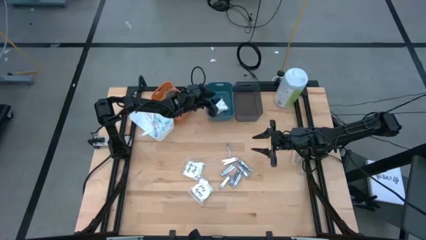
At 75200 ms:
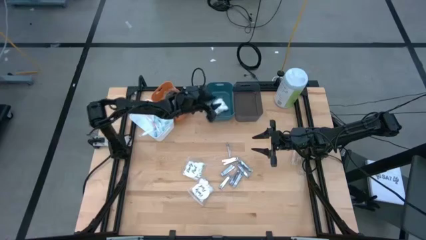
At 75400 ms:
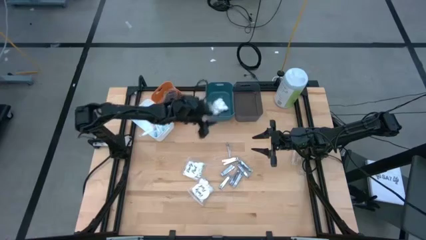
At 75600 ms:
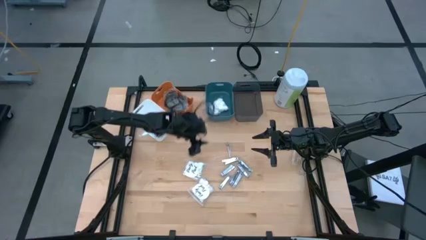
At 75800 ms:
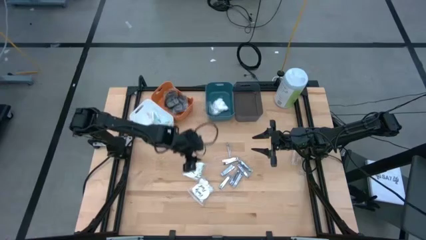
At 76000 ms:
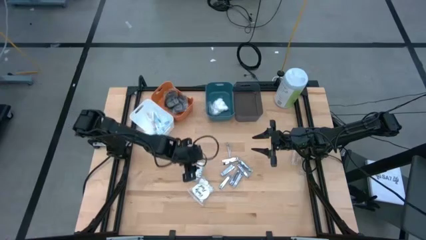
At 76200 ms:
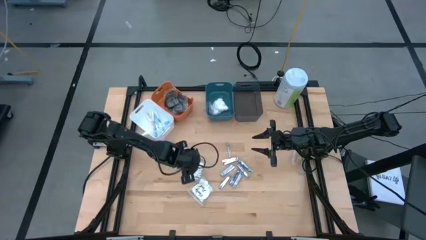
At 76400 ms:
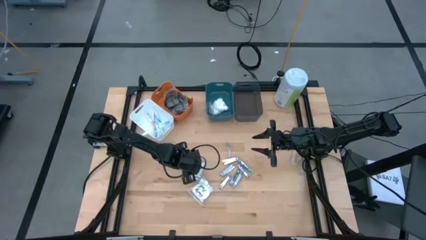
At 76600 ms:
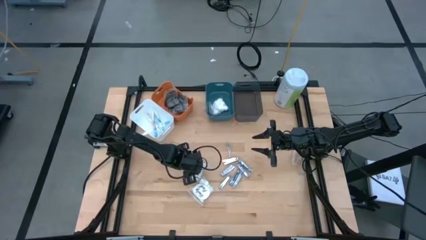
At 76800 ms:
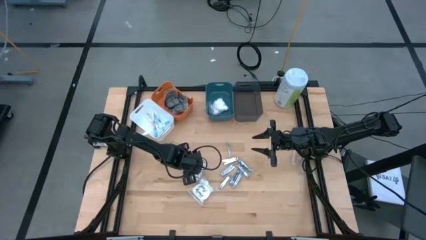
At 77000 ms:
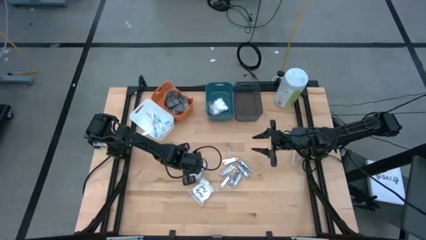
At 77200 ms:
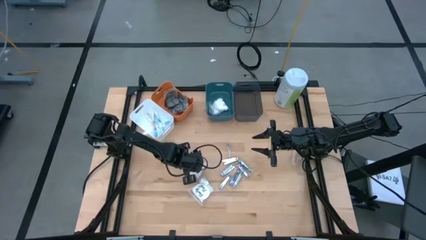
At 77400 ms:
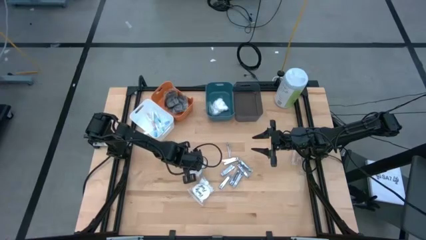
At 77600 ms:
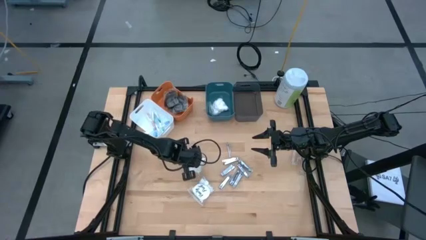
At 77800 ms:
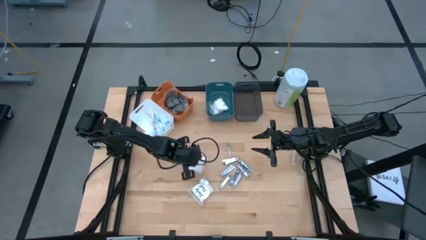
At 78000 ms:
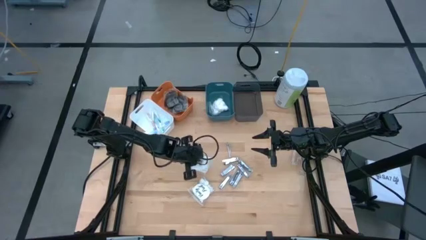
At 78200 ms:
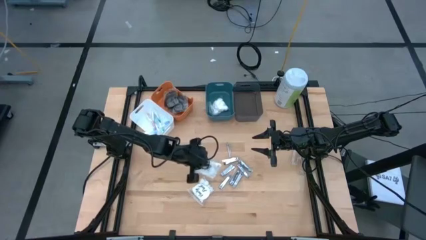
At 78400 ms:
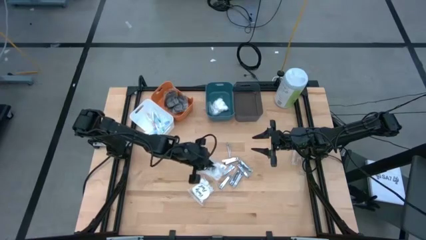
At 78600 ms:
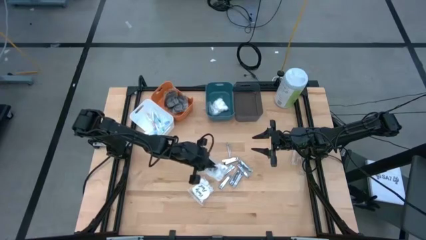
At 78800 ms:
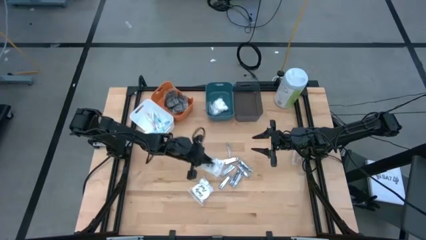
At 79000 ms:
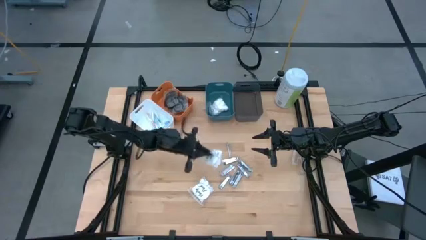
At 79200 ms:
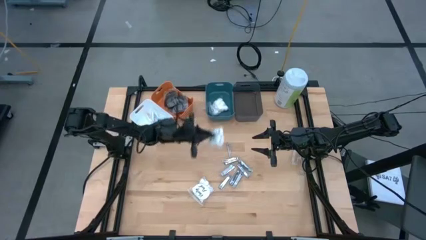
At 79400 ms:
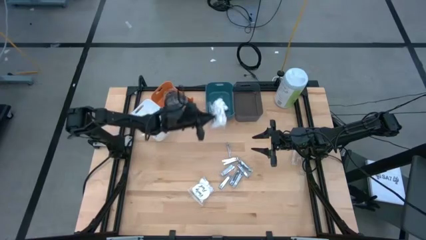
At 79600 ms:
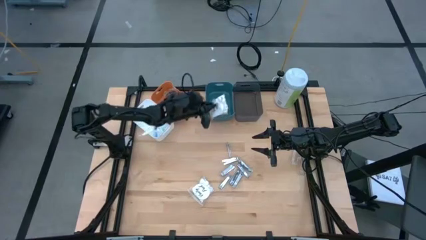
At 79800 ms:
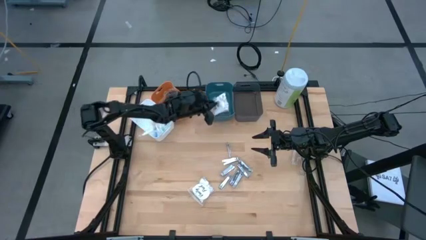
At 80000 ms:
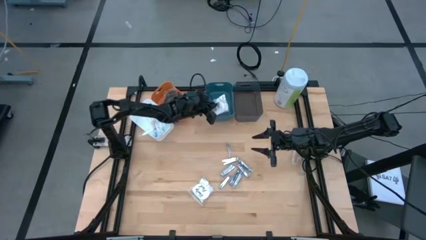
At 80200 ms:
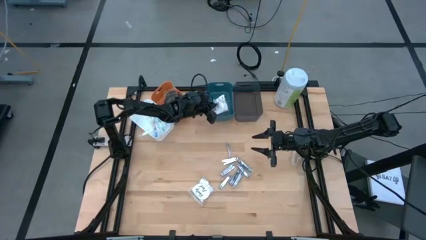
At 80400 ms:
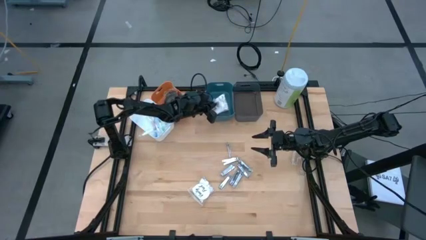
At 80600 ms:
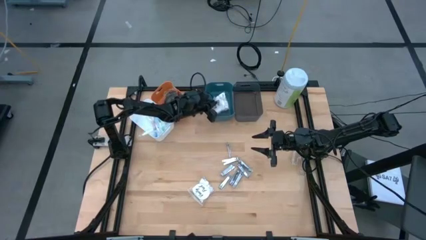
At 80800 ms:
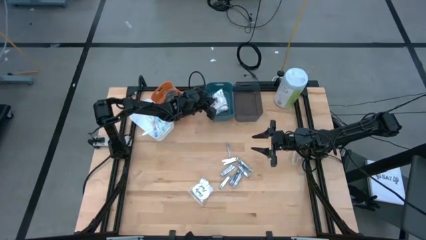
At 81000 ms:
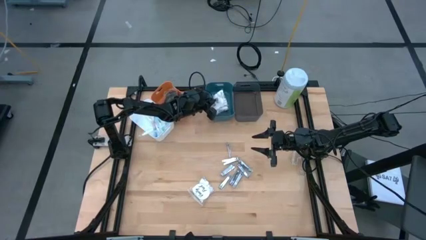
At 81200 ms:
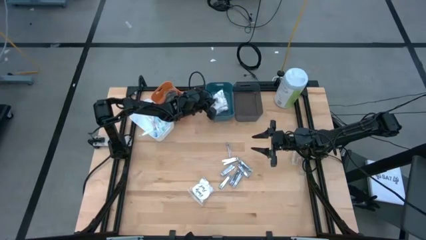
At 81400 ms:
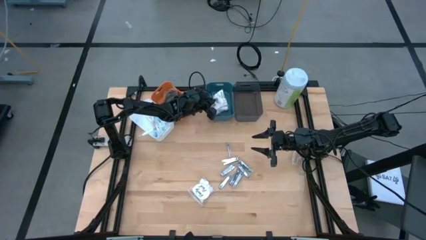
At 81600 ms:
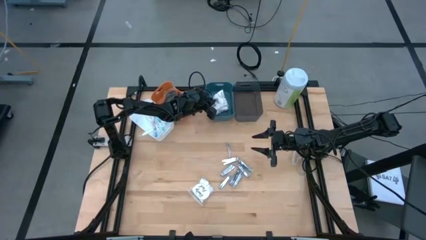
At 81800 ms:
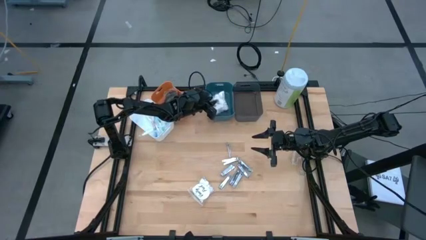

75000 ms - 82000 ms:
Task: Pick & Place Travel size toiletries
Put the top white cotton packet into the green bin

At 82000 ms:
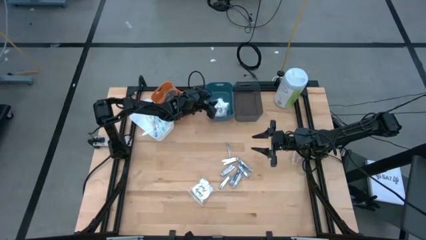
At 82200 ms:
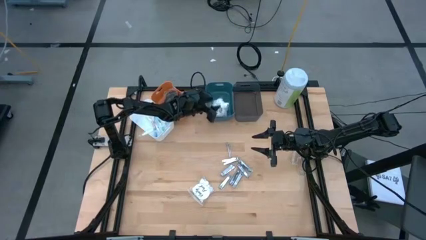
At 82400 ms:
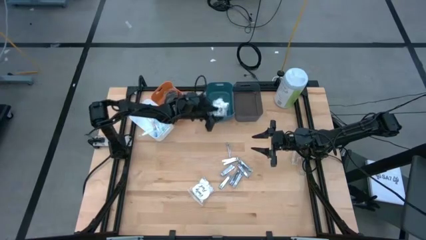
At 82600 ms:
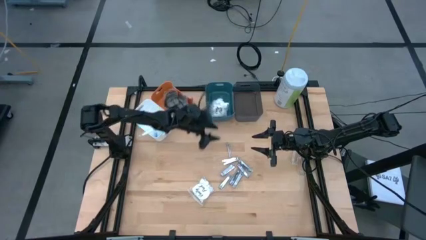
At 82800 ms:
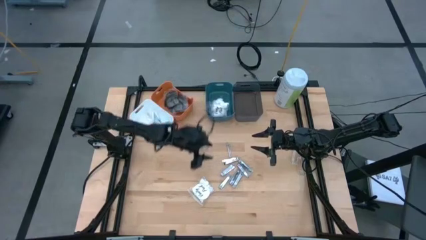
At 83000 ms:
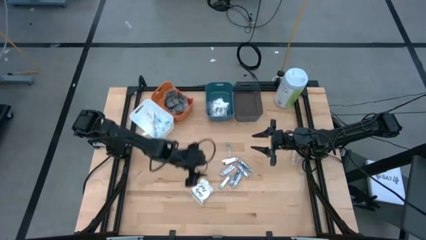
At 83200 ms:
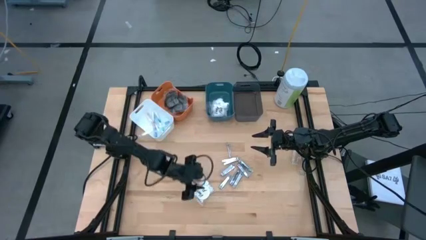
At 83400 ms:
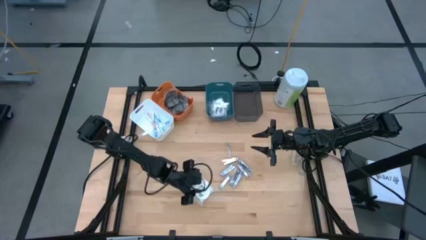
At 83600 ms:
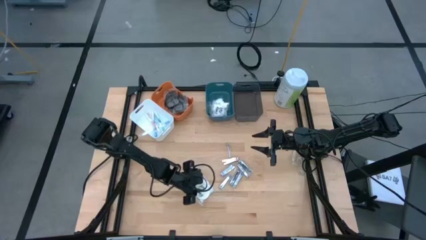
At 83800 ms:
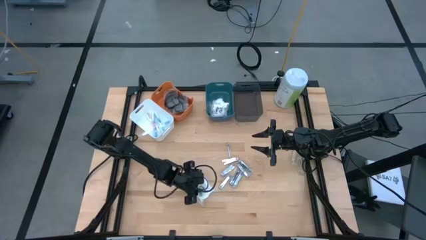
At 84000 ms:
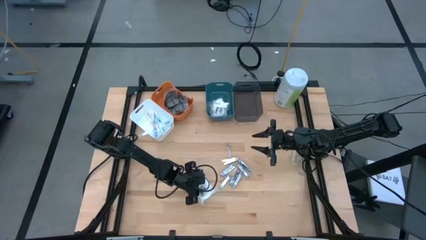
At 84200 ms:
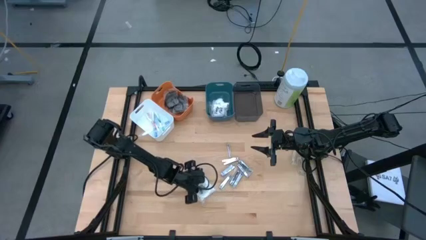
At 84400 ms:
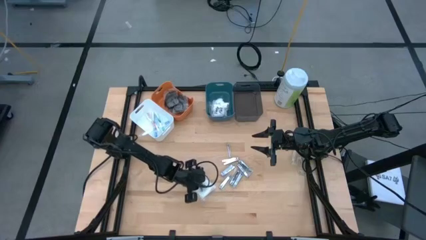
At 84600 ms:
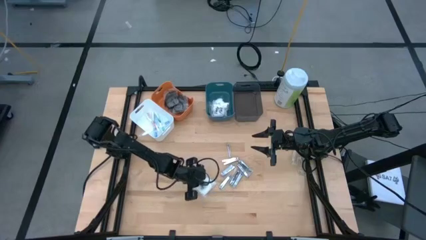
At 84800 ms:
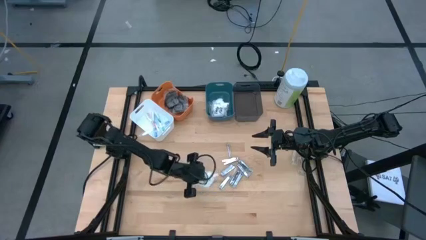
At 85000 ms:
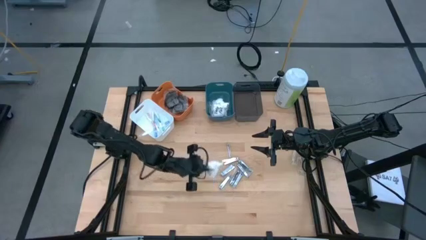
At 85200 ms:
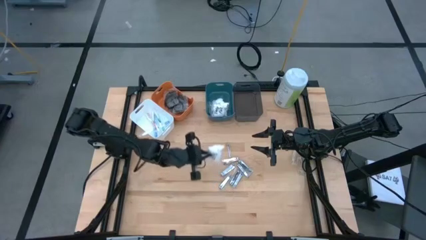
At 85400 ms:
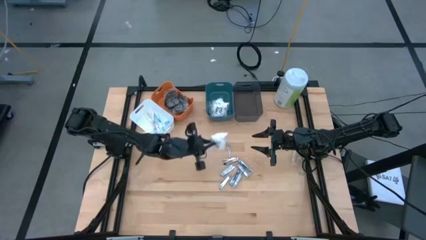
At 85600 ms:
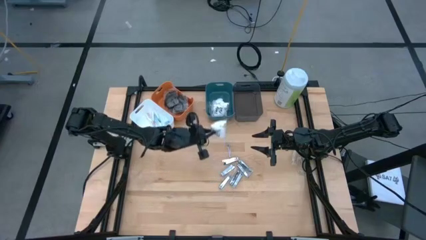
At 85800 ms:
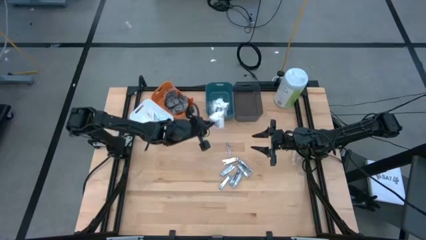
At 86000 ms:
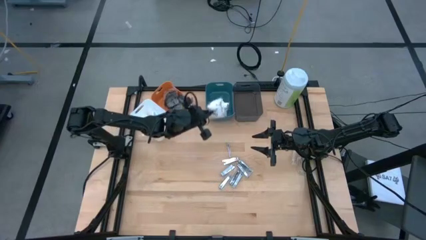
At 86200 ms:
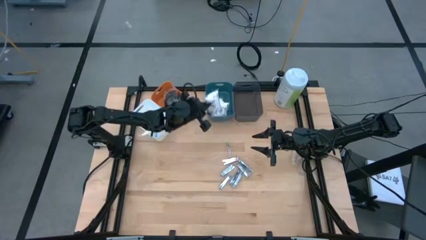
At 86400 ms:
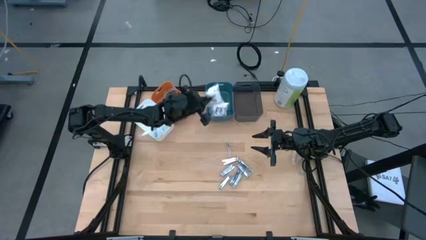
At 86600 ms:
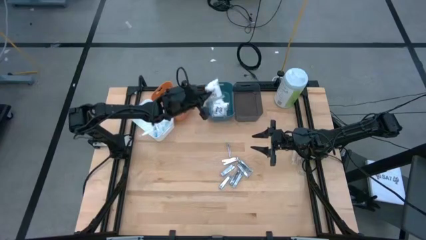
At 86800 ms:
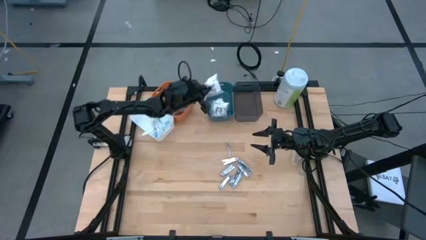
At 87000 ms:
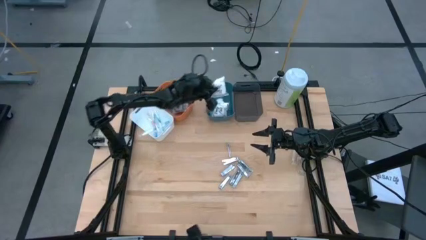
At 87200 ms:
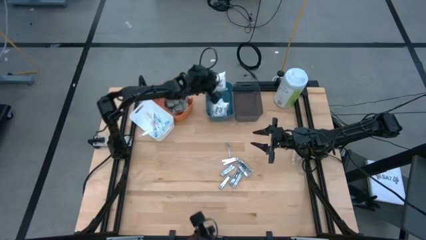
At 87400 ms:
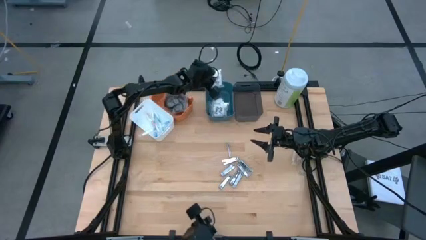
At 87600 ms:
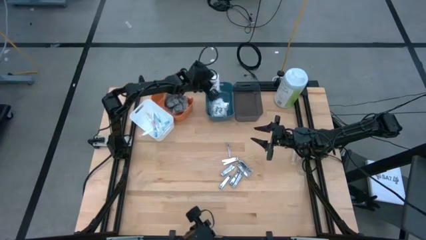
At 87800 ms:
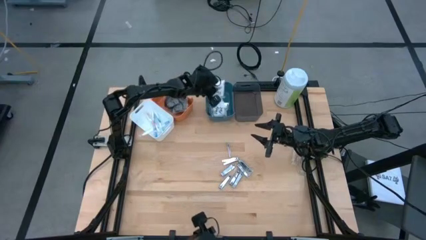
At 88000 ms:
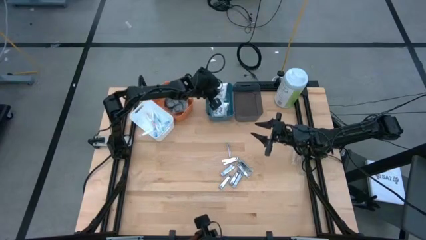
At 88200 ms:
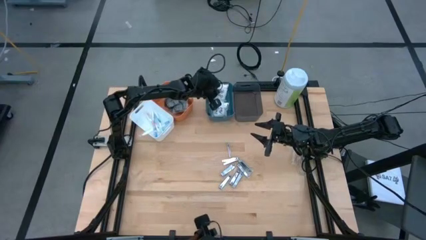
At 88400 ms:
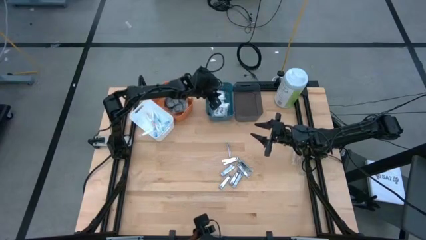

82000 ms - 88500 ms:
Put the white cotton packet into the green bin

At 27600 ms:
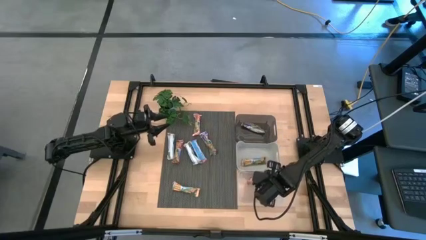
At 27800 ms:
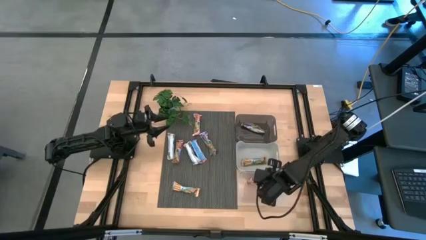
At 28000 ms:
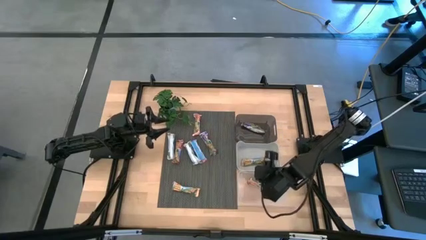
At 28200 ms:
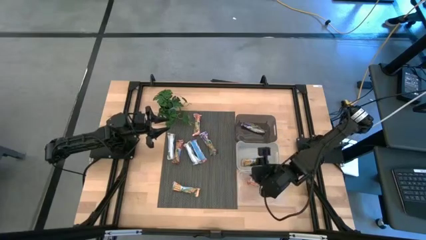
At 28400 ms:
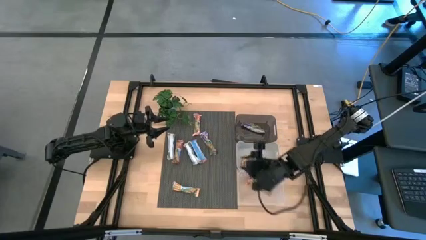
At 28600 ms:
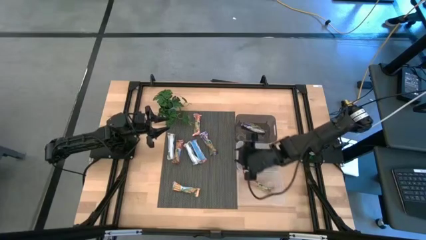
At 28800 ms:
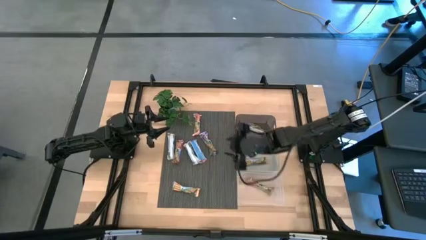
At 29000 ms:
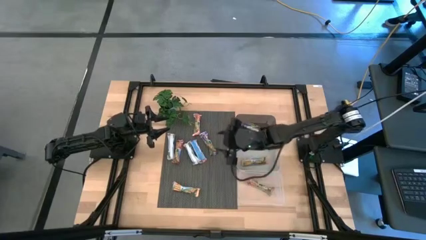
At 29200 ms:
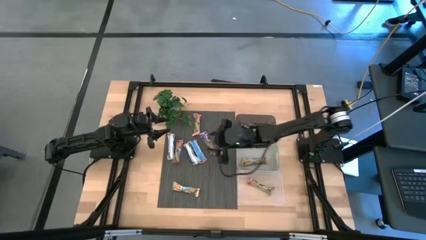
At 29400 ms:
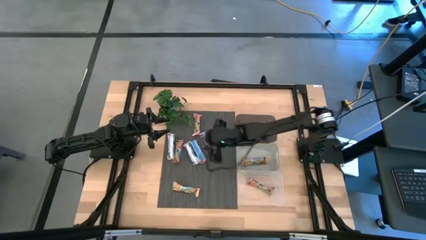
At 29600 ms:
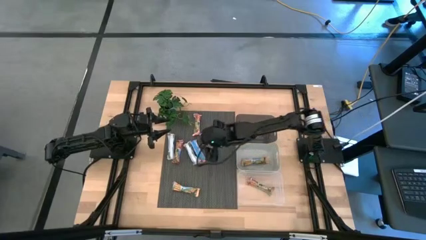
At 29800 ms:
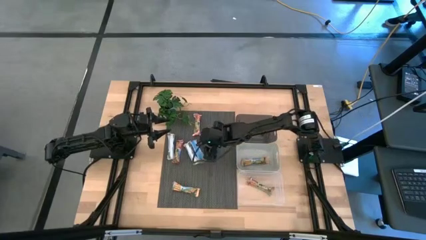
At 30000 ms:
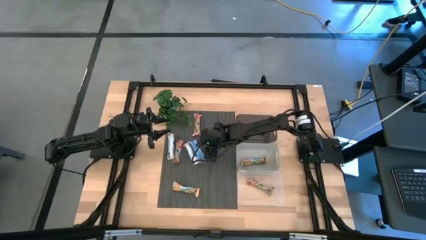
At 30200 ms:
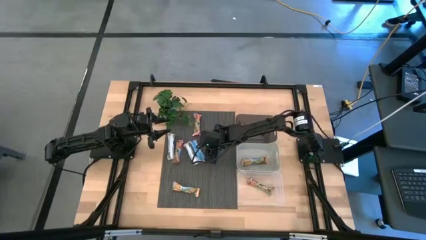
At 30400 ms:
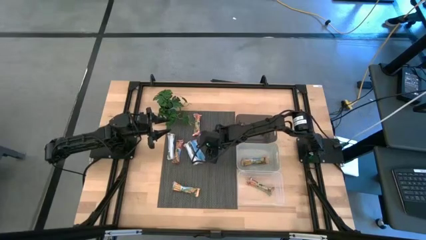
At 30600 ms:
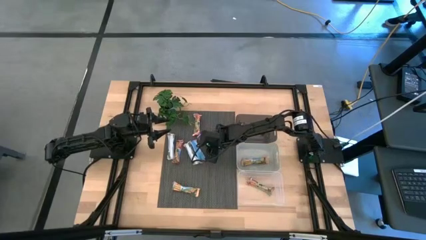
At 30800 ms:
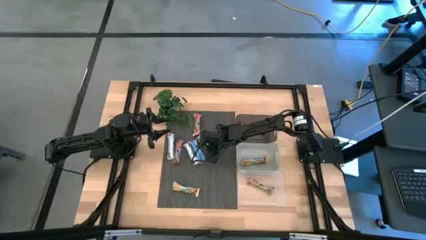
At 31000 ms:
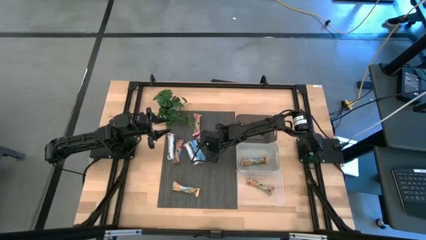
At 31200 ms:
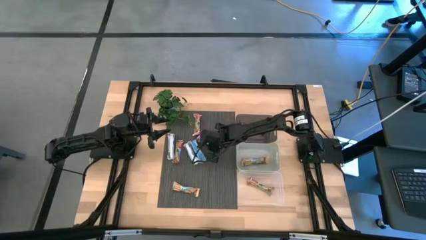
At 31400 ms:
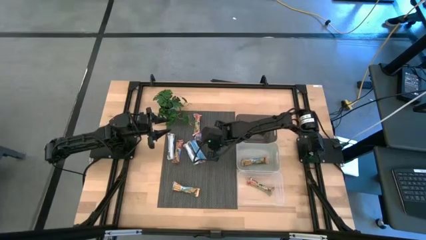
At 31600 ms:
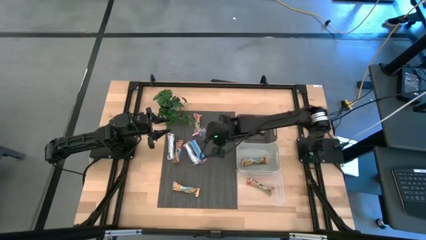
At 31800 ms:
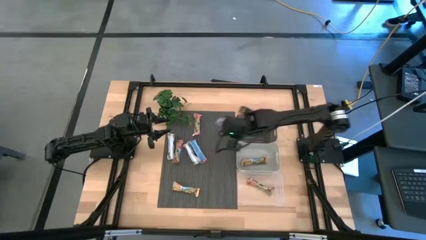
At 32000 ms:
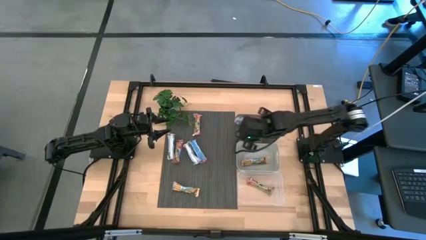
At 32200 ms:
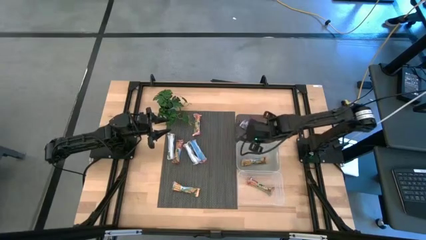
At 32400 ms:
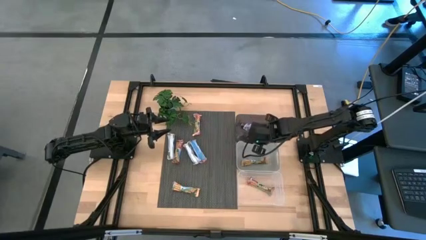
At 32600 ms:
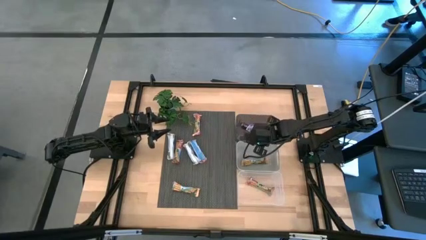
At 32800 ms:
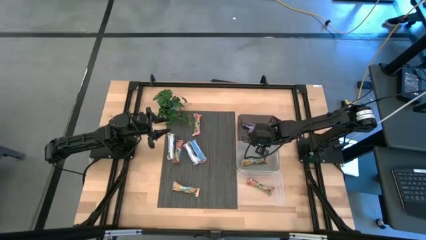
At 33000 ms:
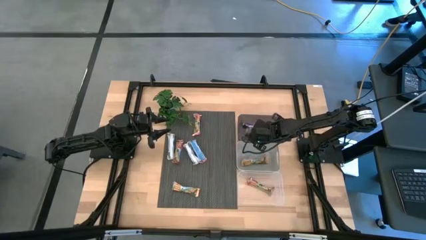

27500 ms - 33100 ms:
Task: Pick and place Granola Bars by type
Put the purple granola bar into the black bin
